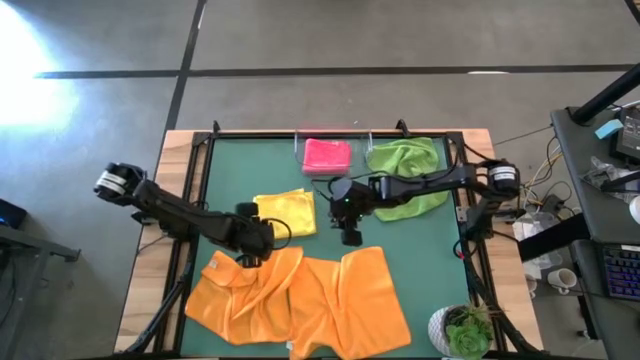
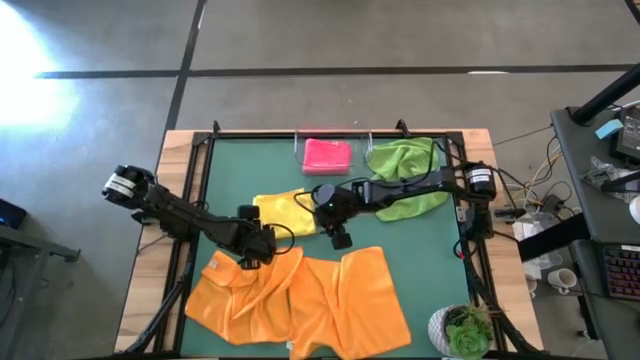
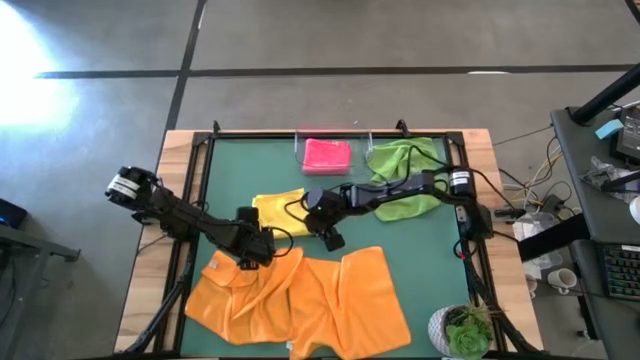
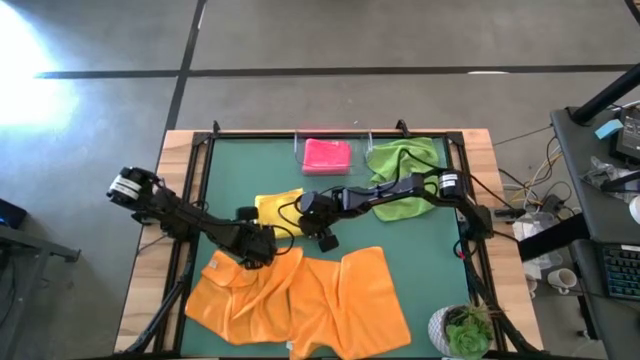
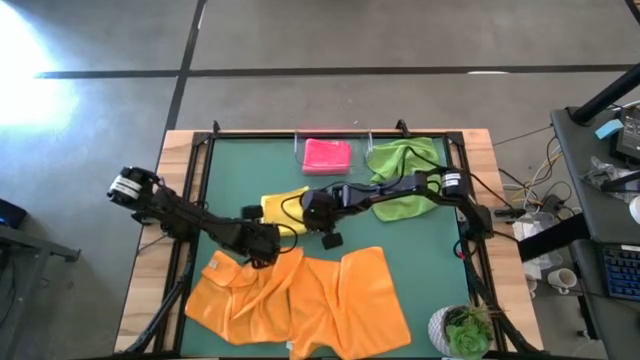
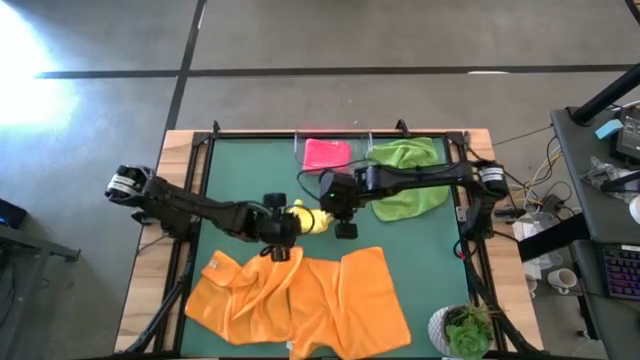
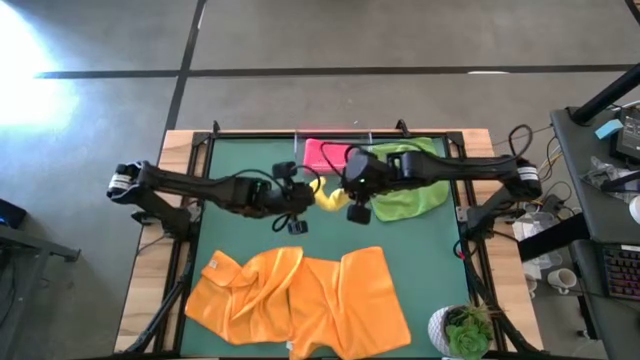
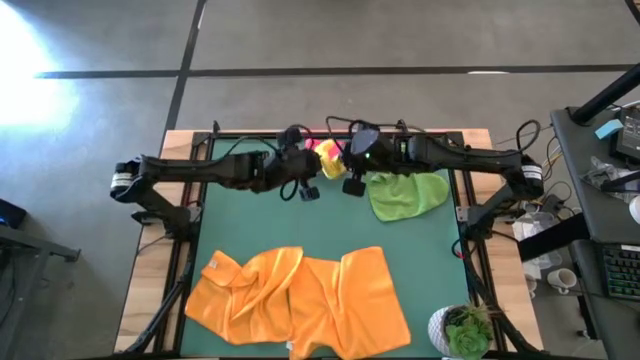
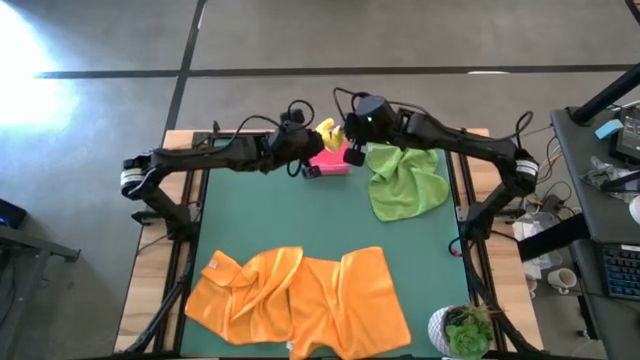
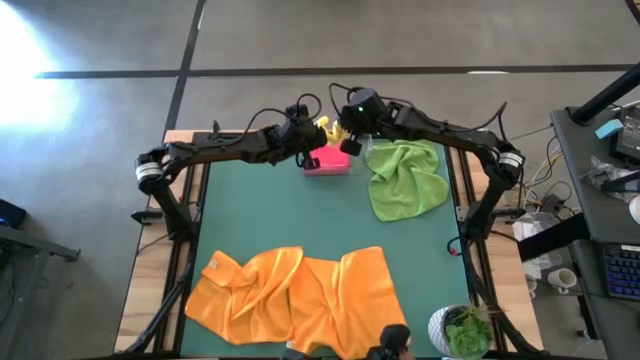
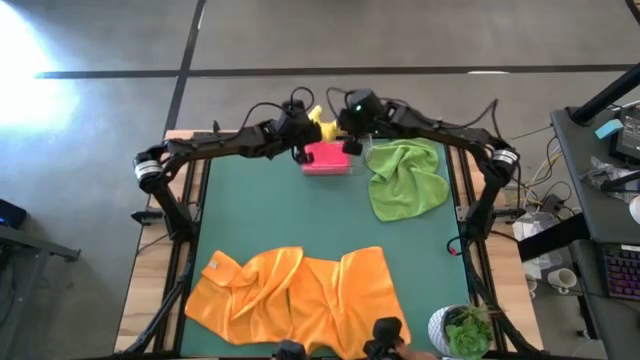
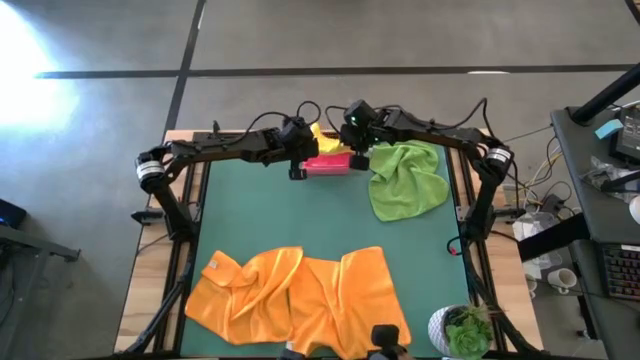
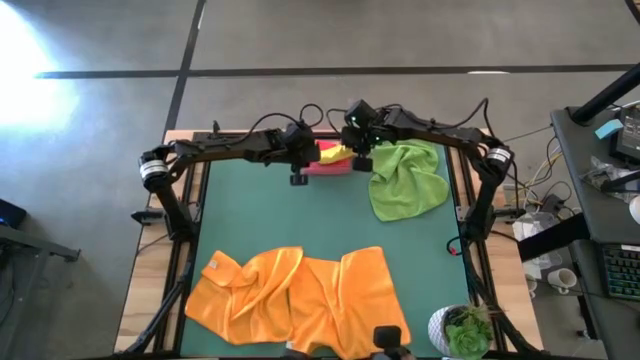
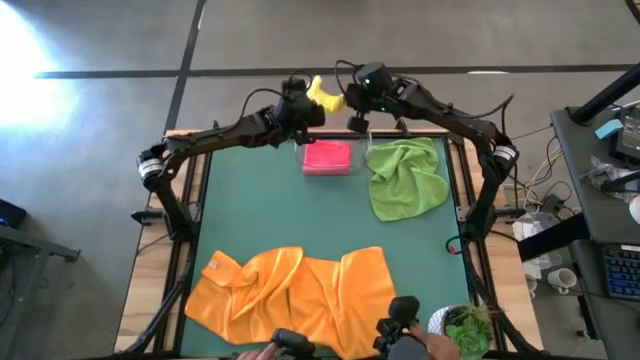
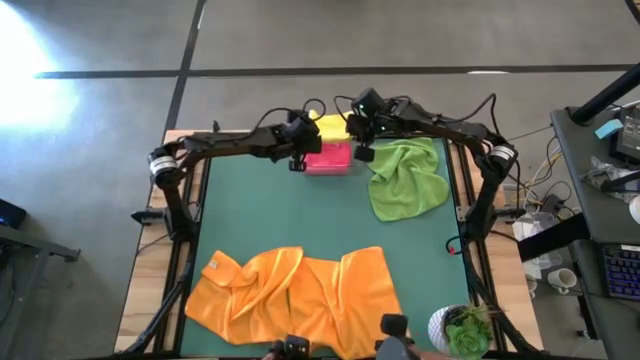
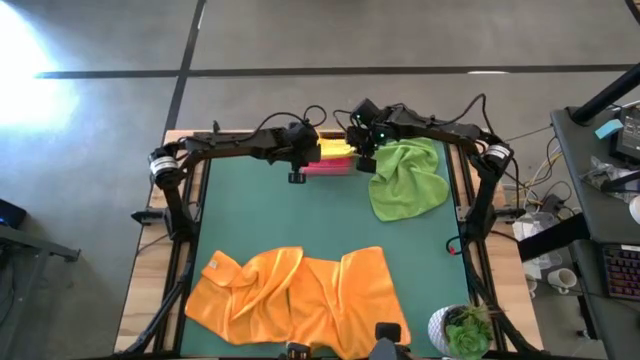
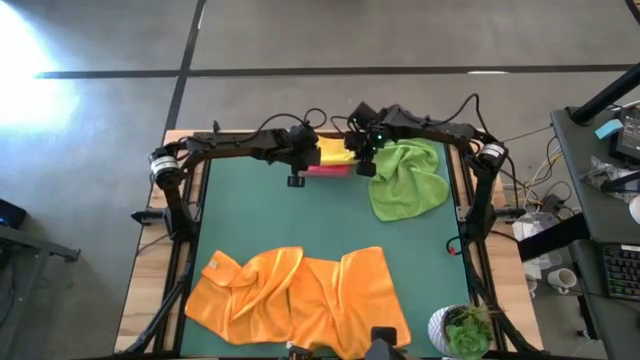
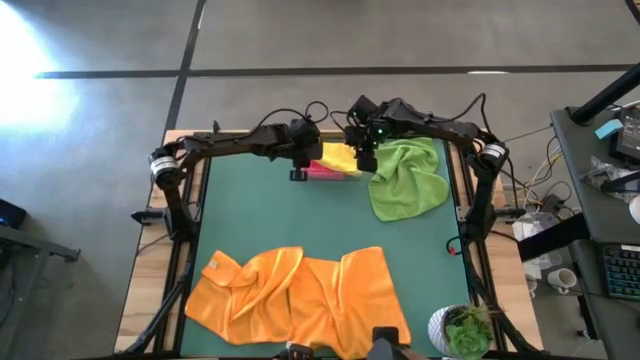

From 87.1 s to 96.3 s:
Task: Fold microfiber towels
Put the yellow microfiber towel into the transparent bin

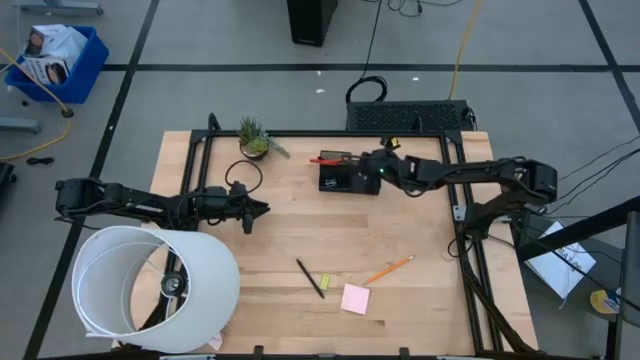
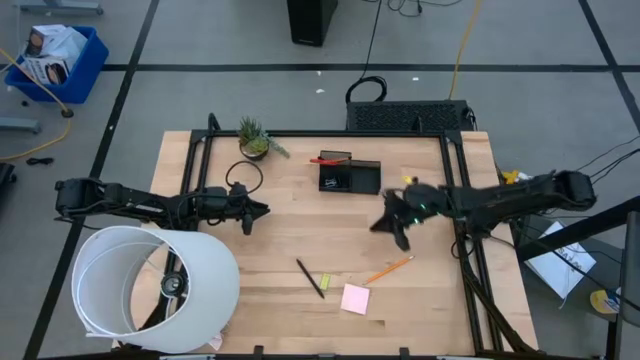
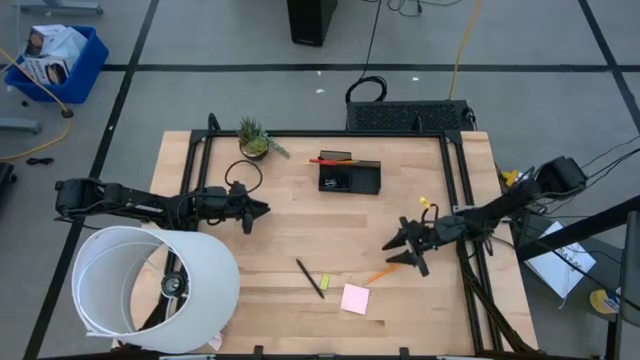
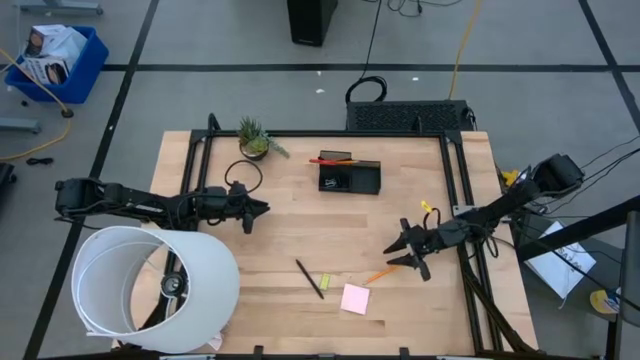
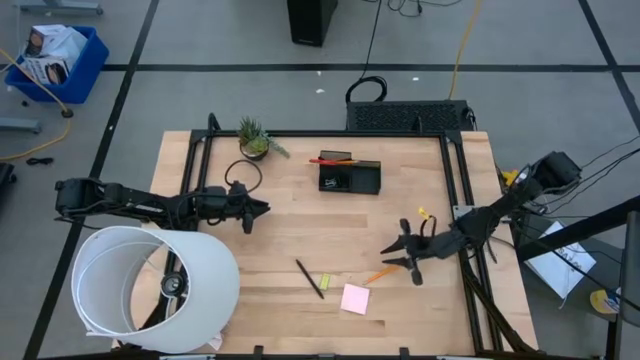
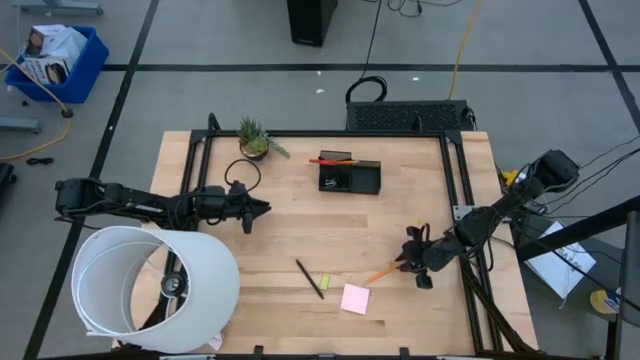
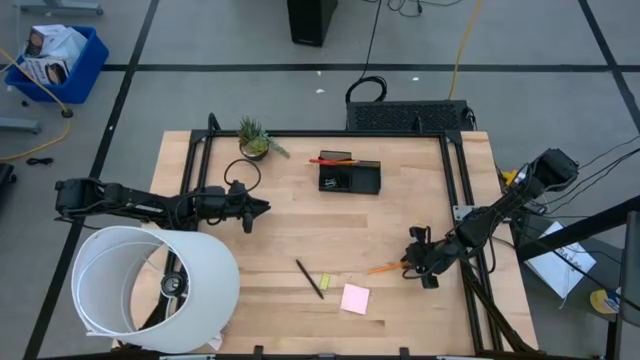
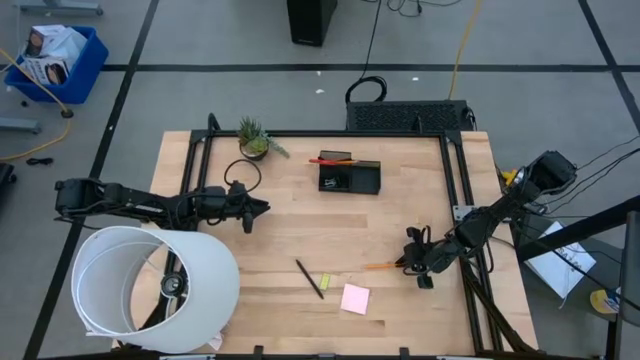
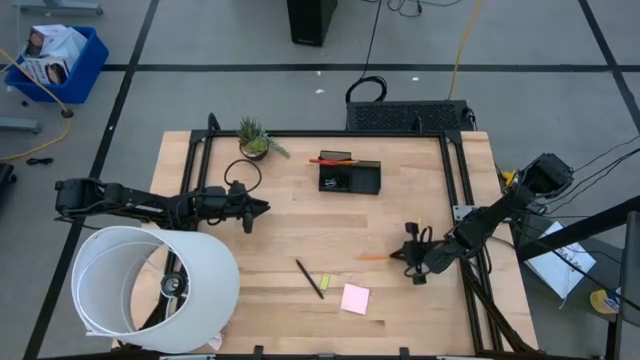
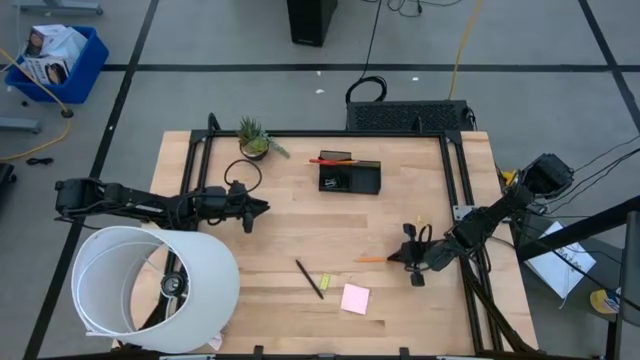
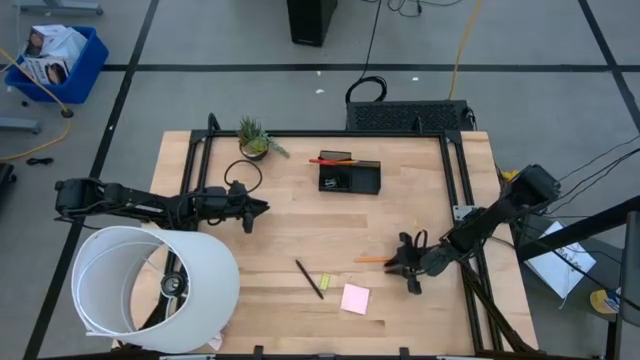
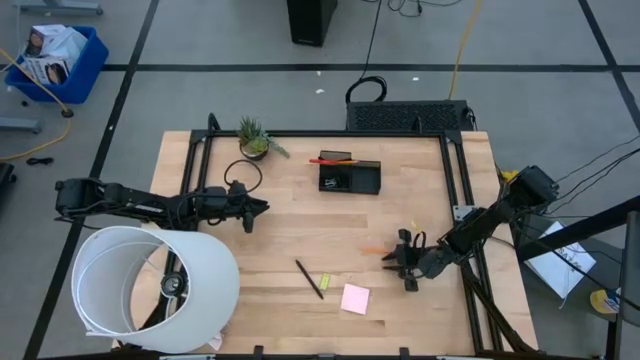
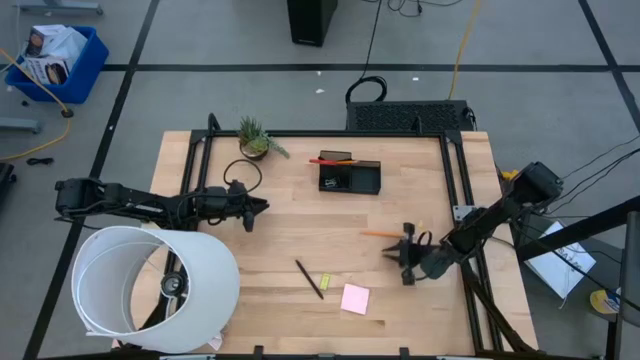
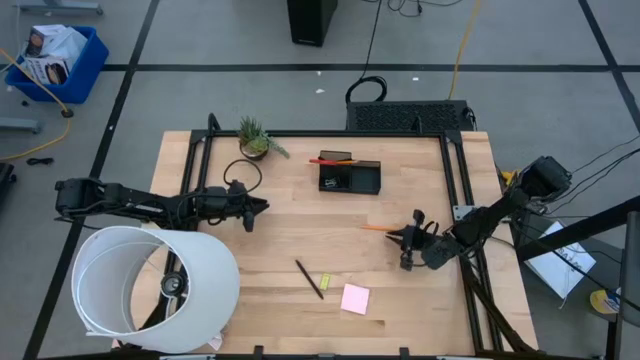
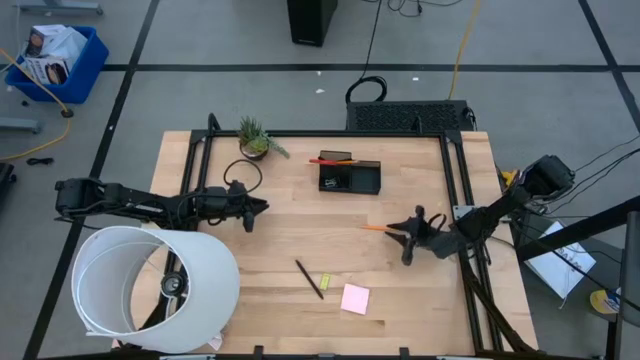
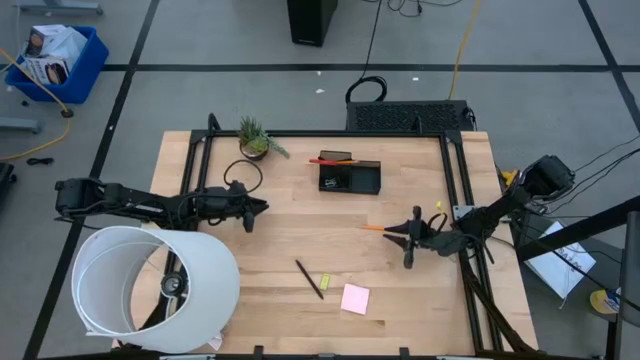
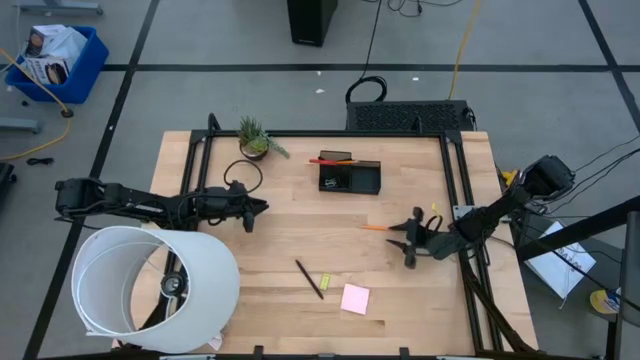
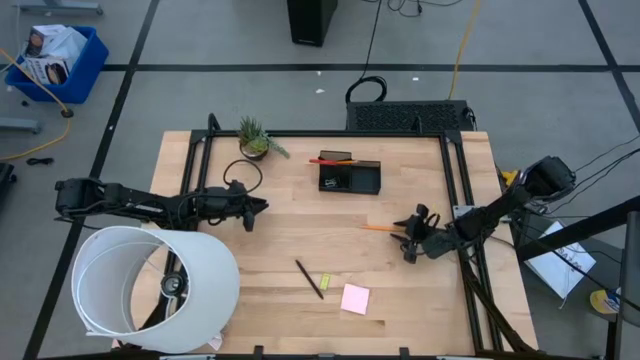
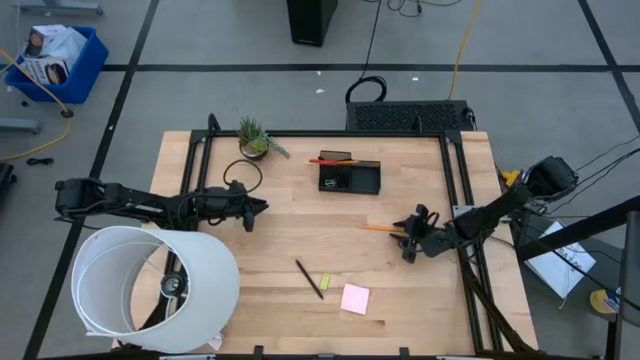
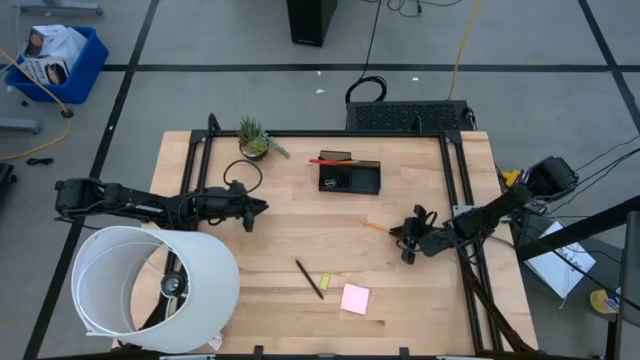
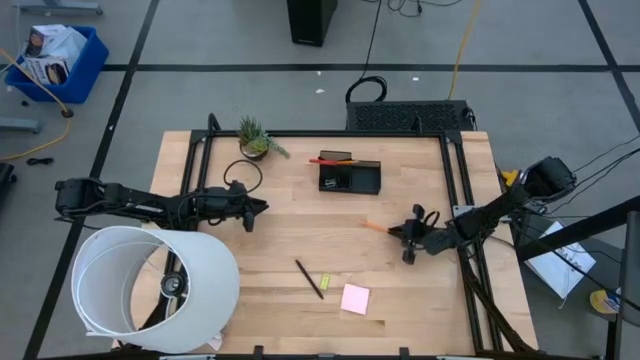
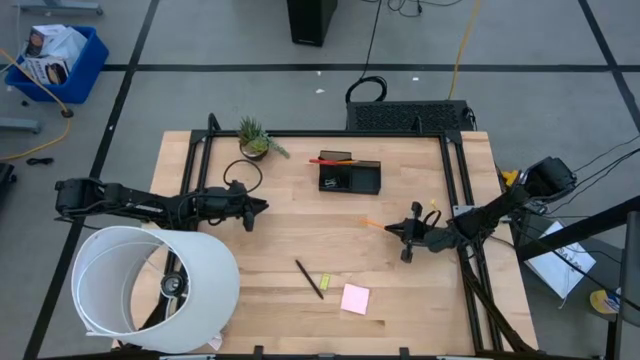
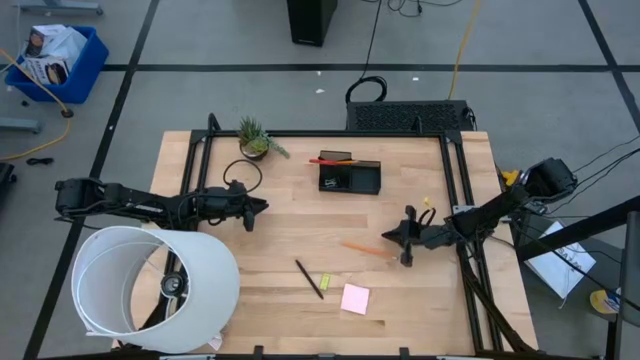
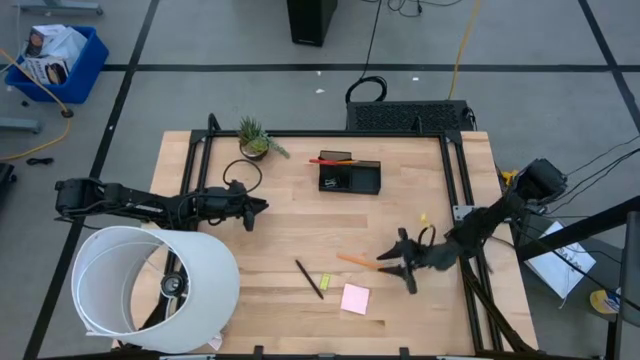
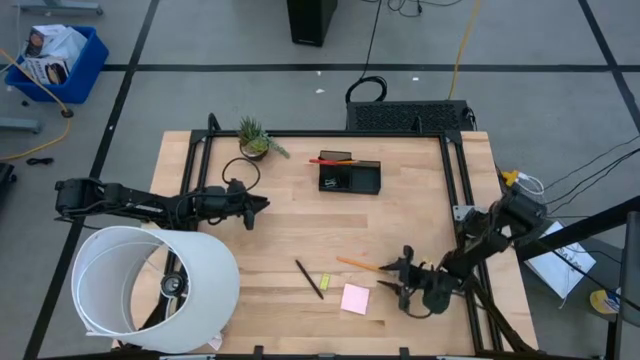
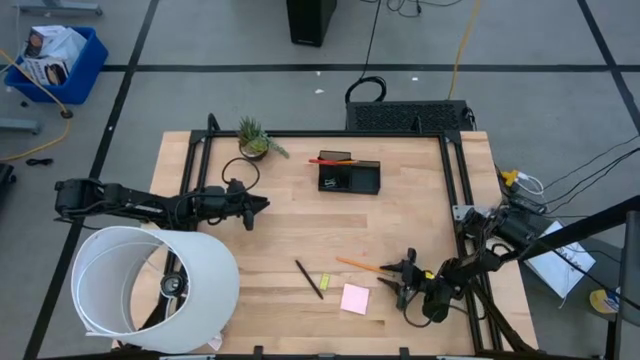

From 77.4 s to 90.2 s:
Task: Pick and place office supplies into organizer
Put the orange pencil into the desk organizer
